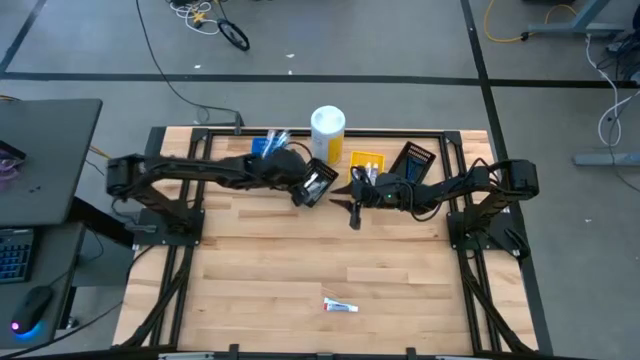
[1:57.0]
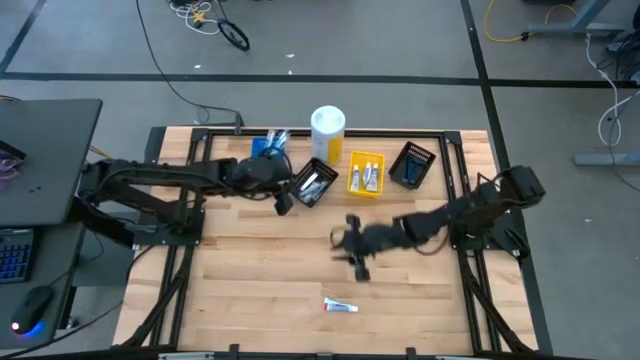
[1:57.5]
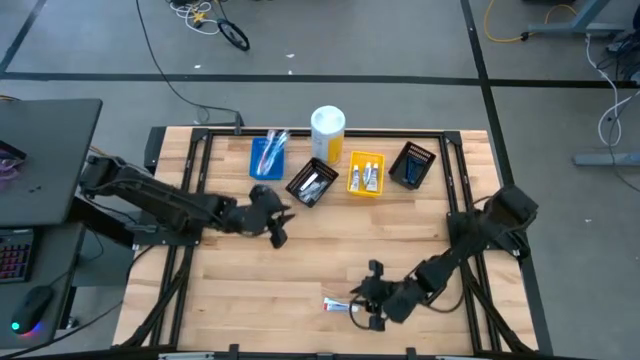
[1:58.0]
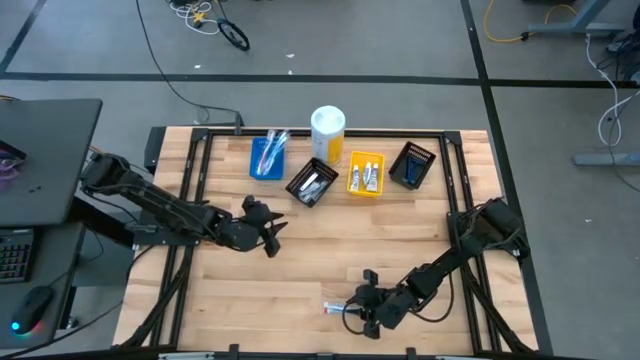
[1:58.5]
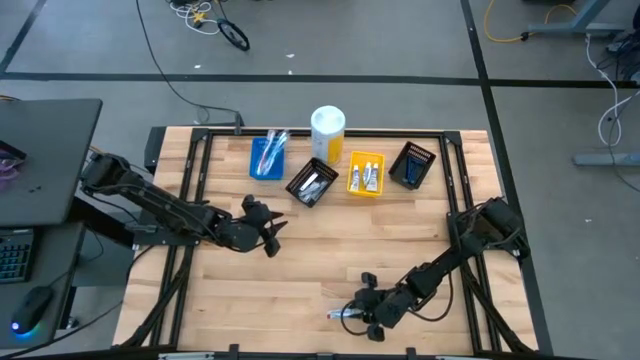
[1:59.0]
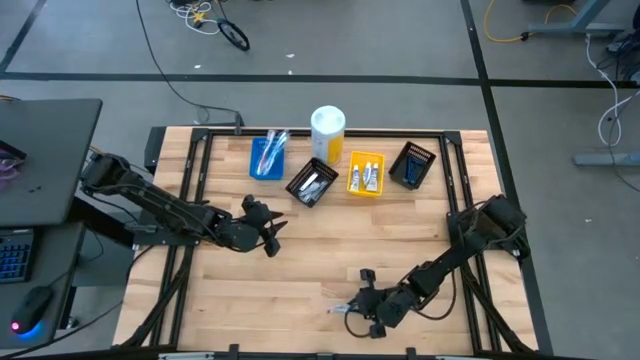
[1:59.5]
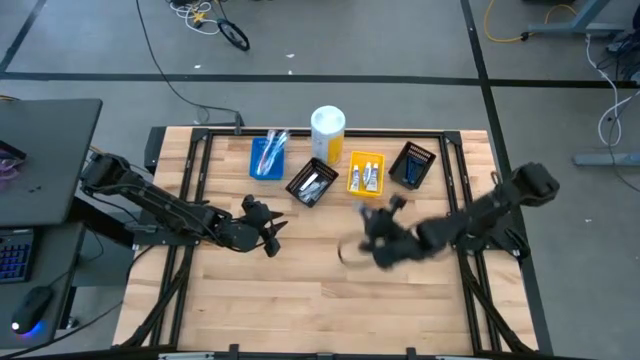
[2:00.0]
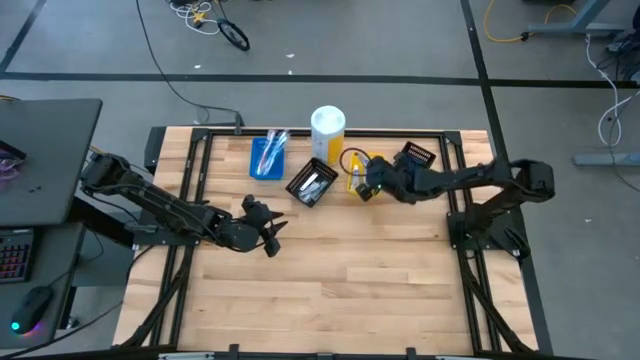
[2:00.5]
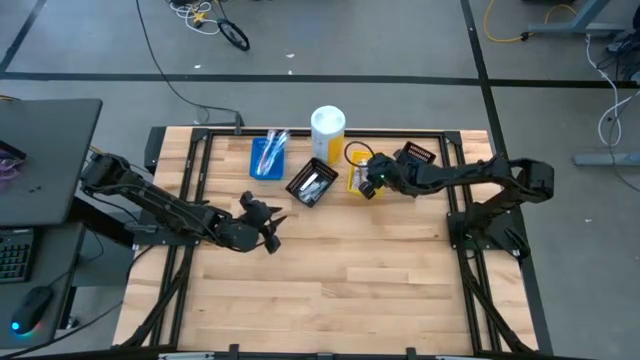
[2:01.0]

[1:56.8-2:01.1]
Task: Pick & Place Travel size toiletries
Put the toothpaste into the yellow bin

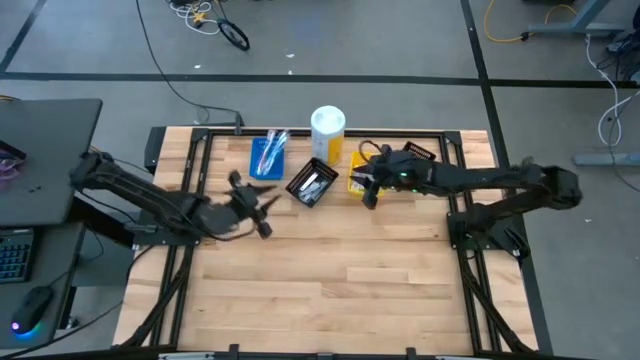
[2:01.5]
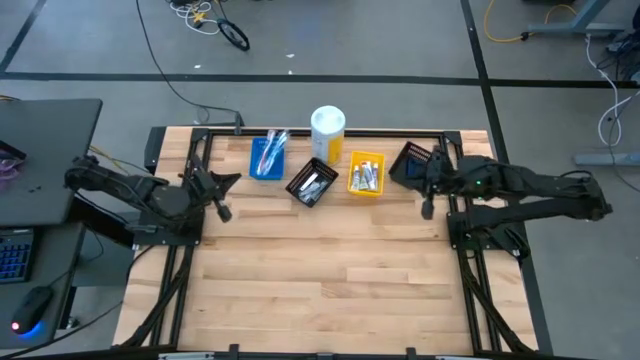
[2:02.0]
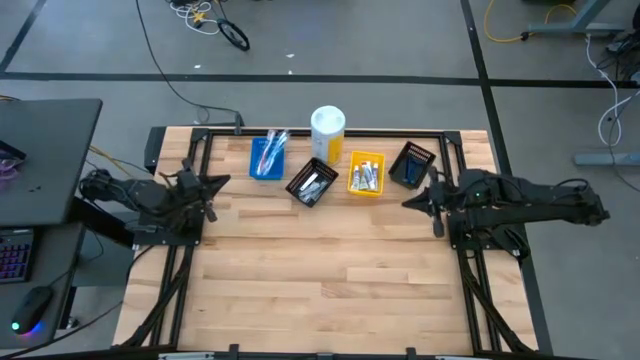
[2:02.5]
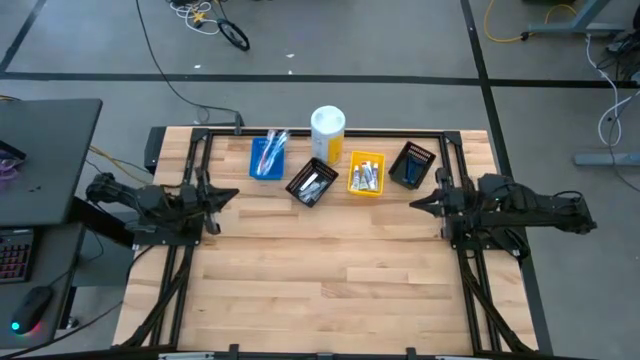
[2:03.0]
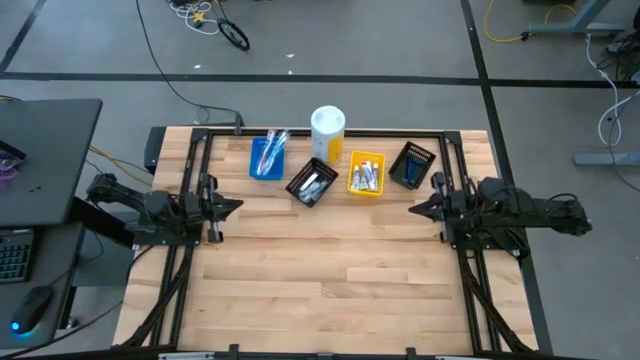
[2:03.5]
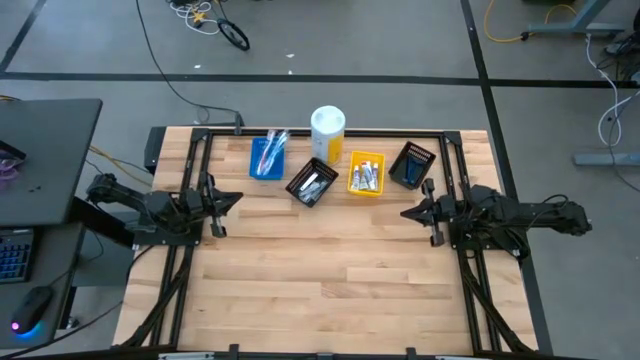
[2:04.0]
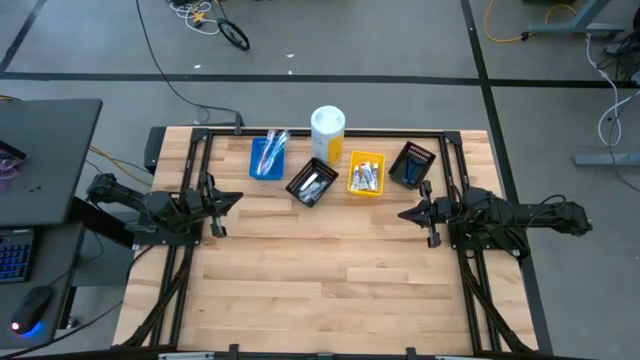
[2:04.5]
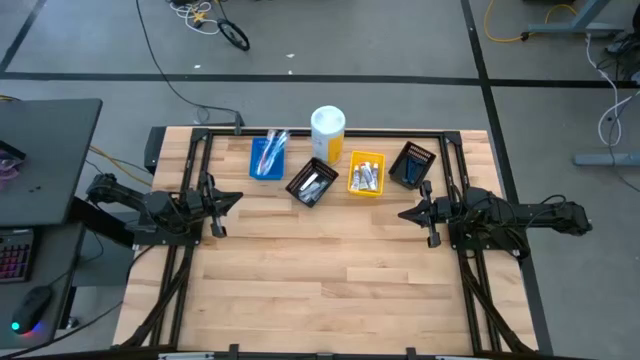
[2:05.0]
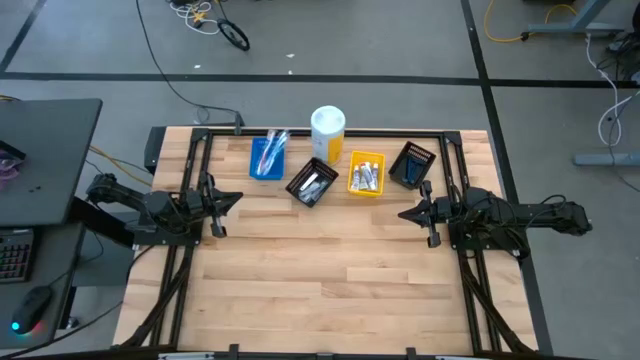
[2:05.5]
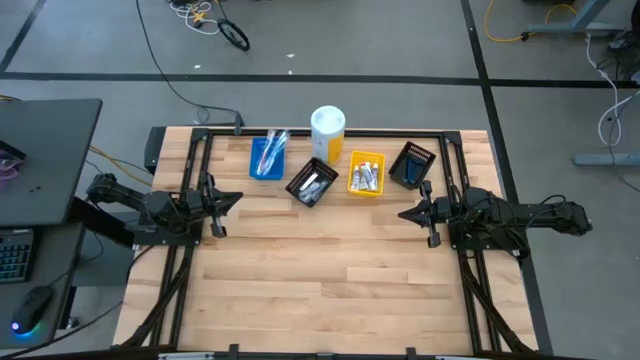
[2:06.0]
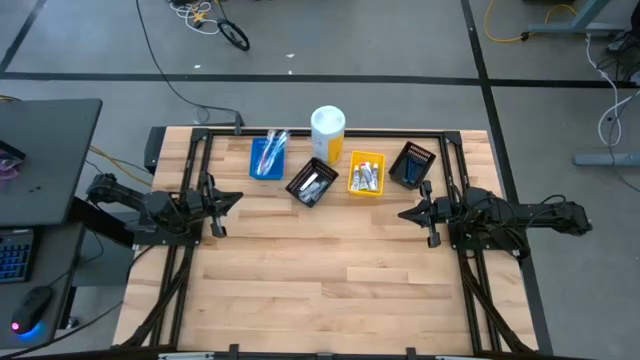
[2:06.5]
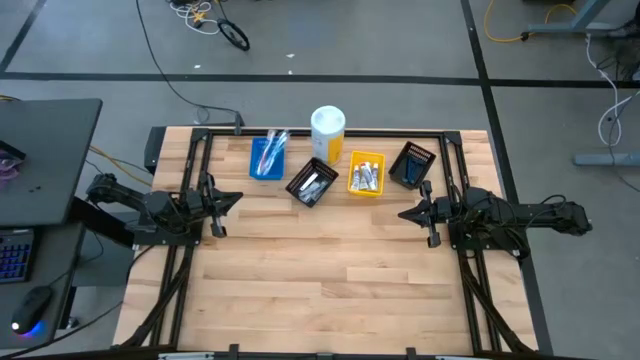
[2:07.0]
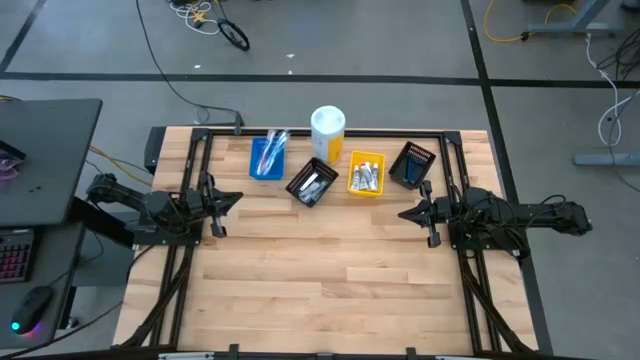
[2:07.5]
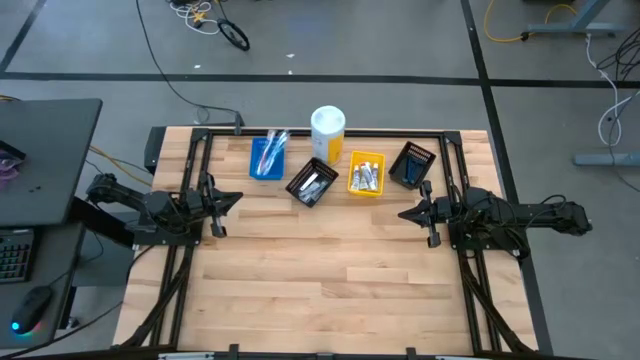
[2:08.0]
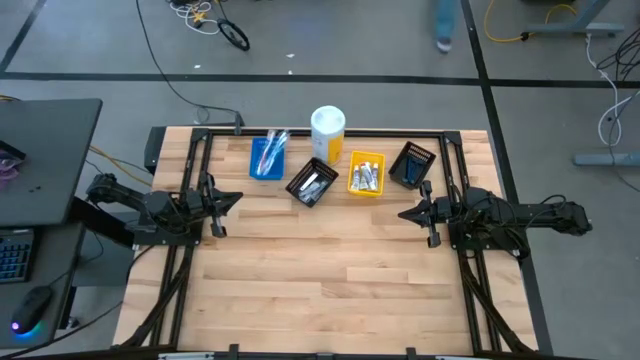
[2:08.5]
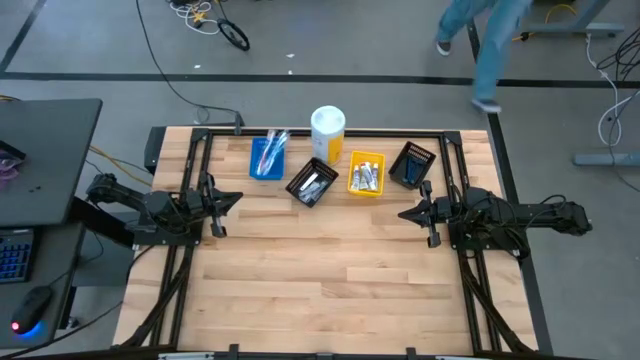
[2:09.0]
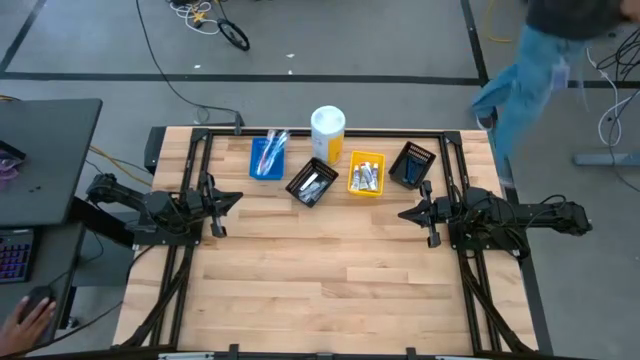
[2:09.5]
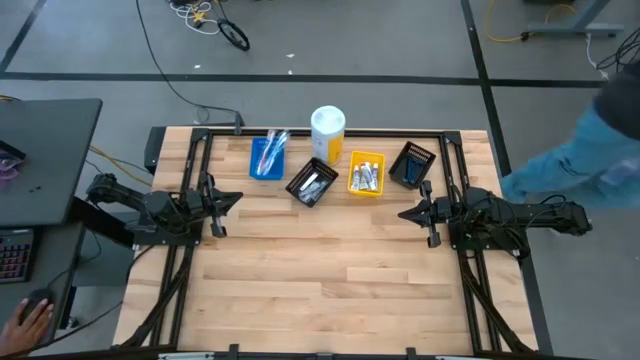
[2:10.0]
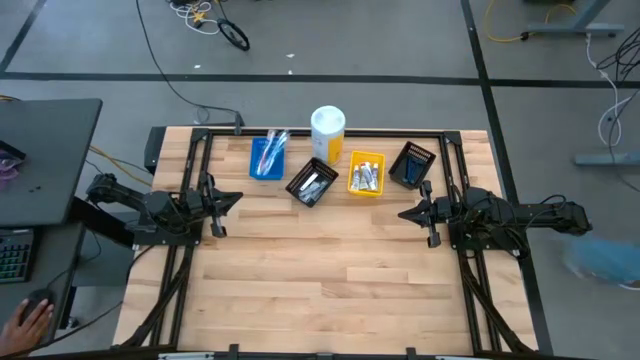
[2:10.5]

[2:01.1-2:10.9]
Return to Home Position

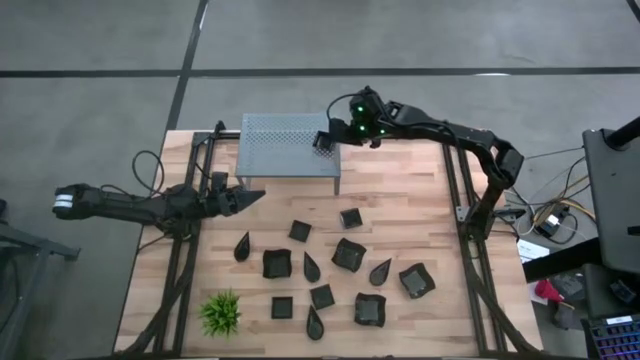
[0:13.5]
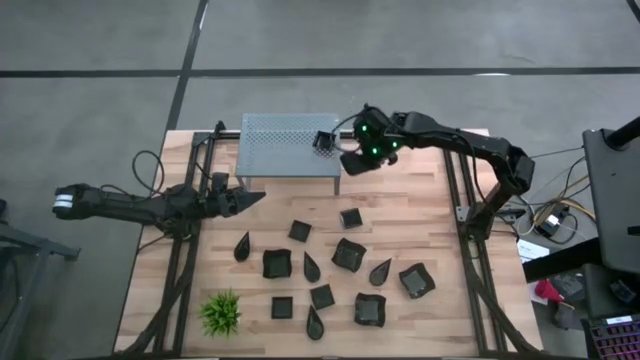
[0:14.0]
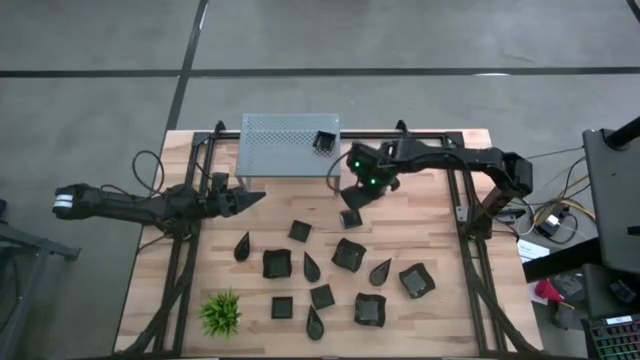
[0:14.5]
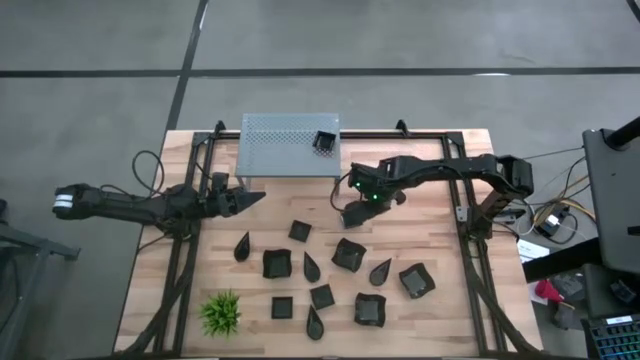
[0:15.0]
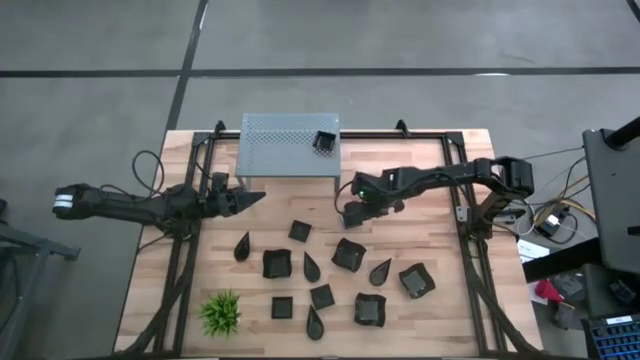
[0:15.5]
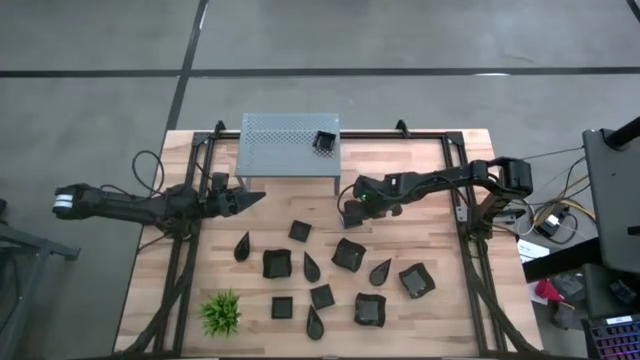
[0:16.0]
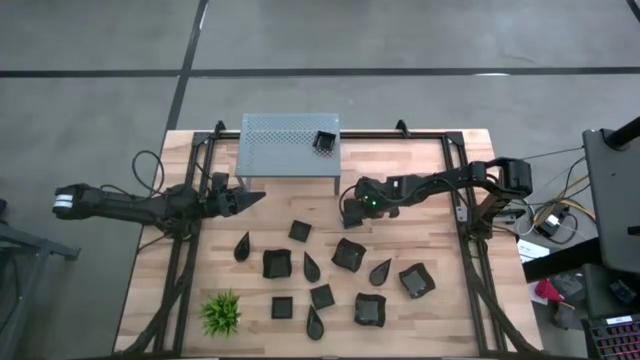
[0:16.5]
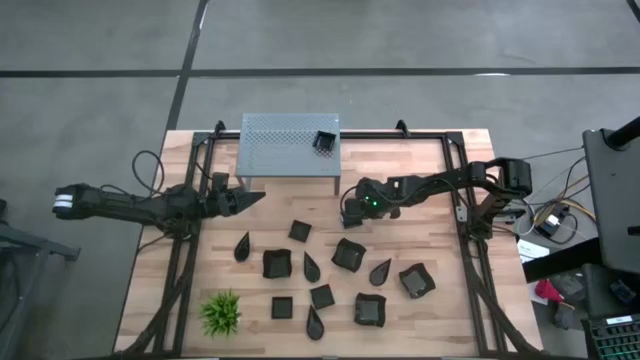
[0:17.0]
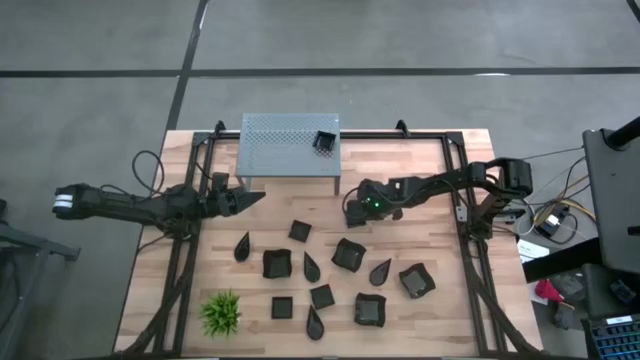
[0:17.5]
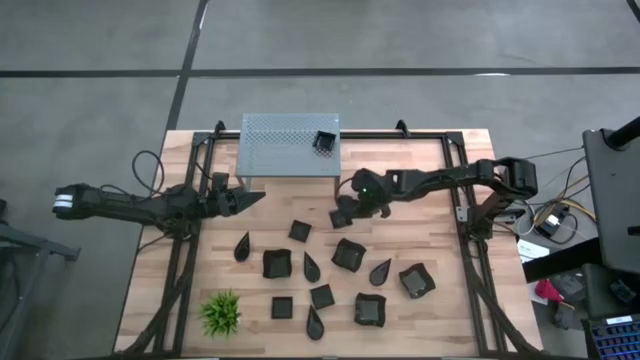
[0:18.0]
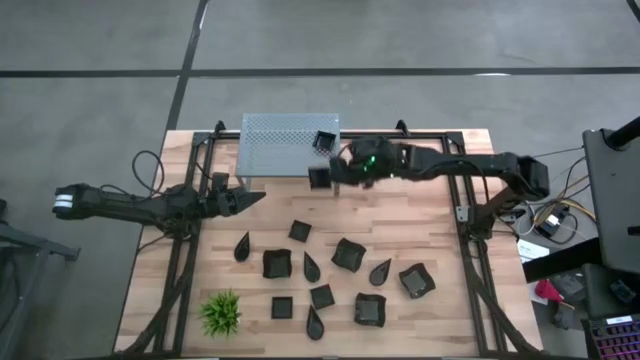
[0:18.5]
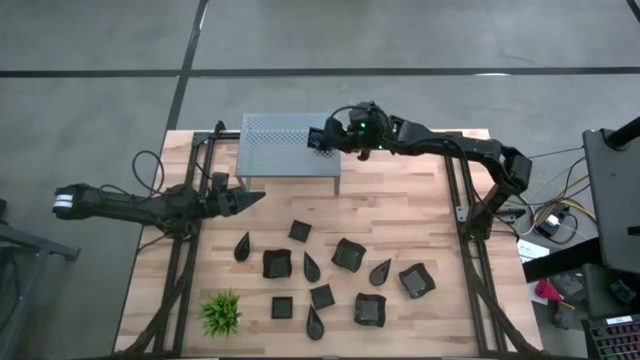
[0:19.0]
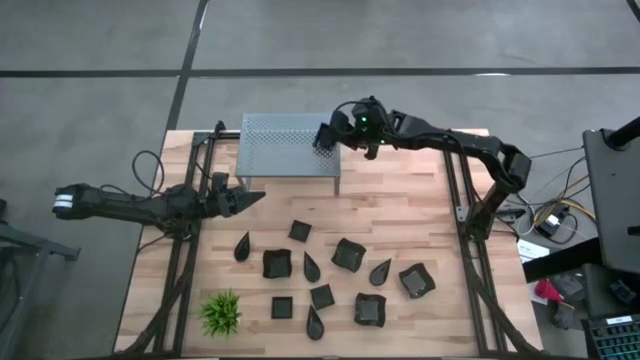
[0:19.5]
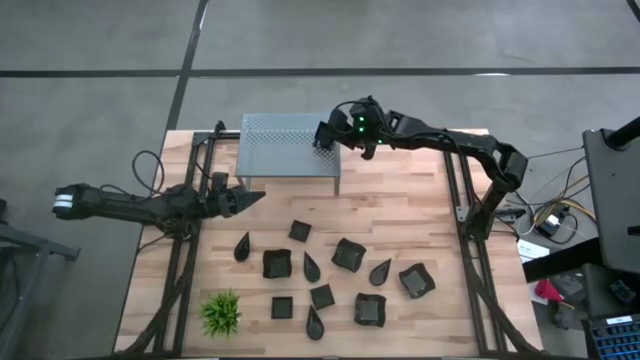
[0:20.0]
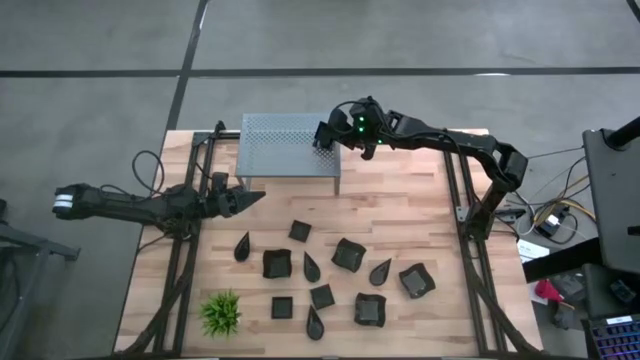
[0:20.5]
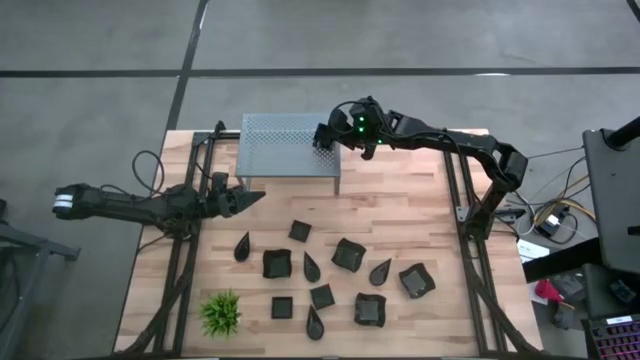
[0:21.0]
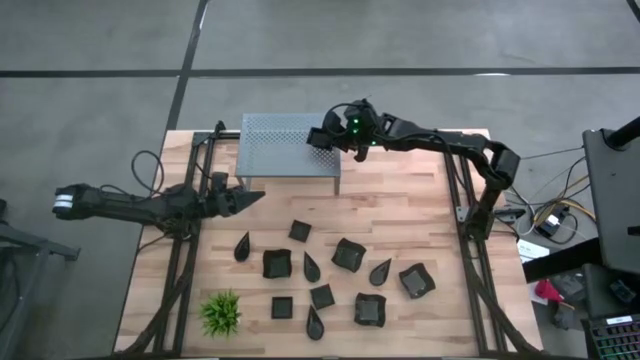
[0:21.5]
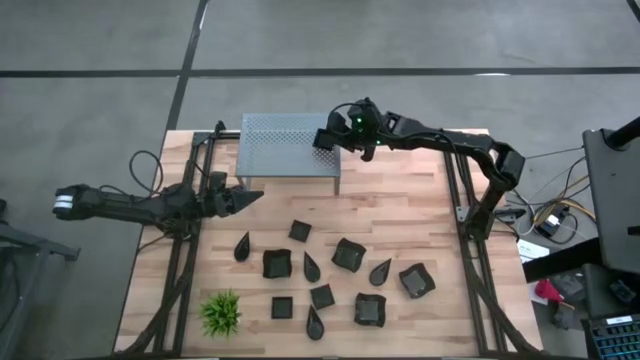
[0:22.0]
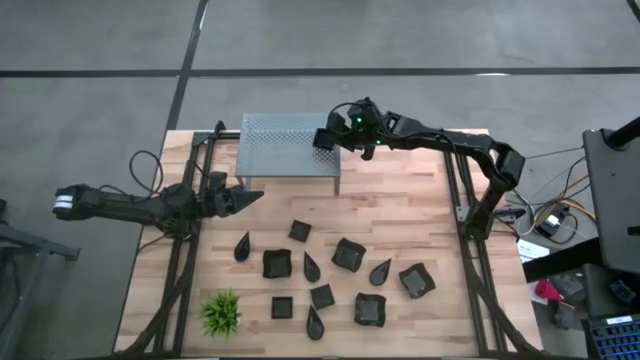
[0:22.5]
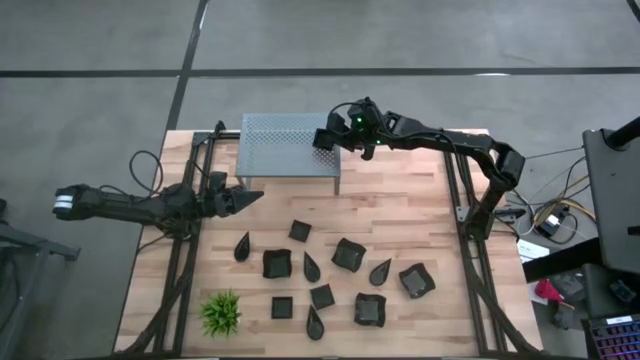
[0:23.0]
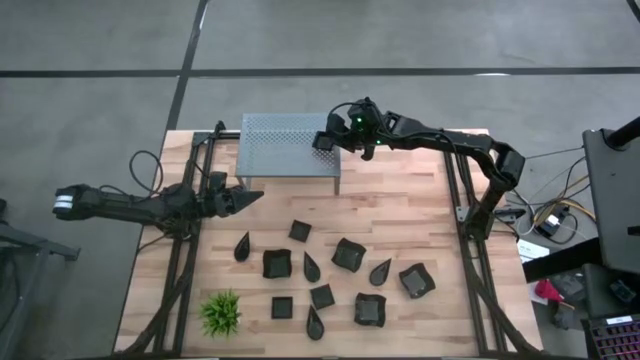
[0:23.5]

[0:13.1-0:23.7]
Task: Pick & Place Mini shaped plates
Stack the square plate on top of the other square plate on the shelf
